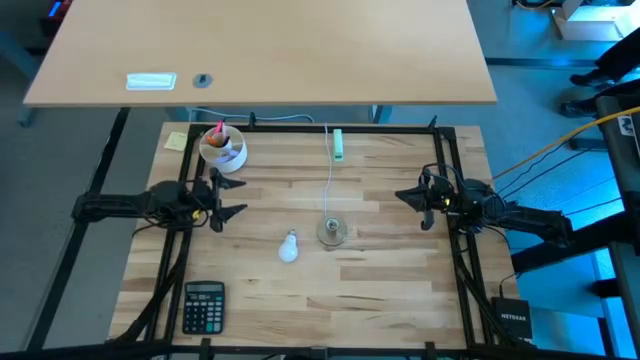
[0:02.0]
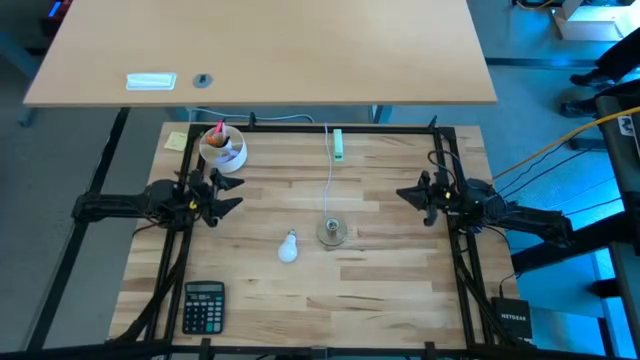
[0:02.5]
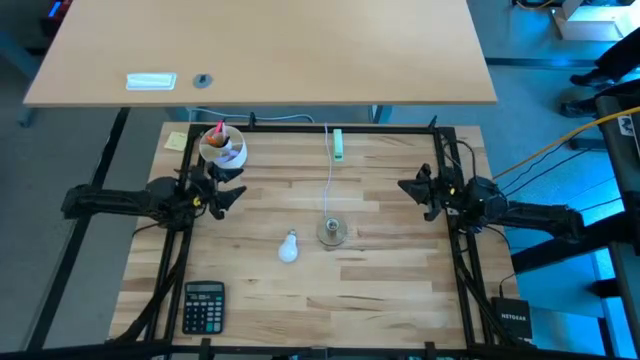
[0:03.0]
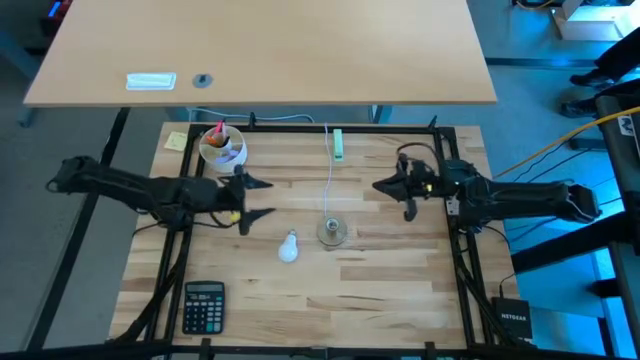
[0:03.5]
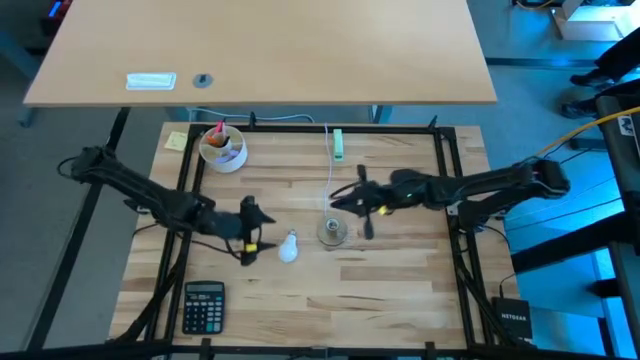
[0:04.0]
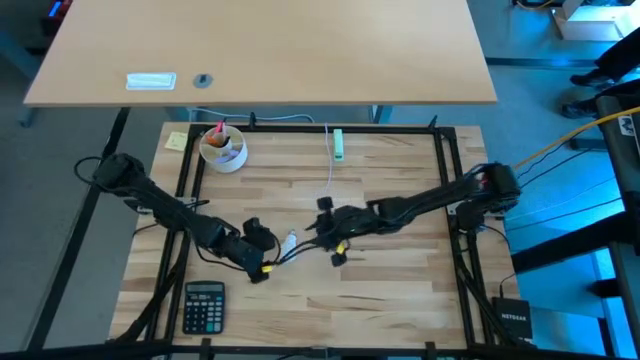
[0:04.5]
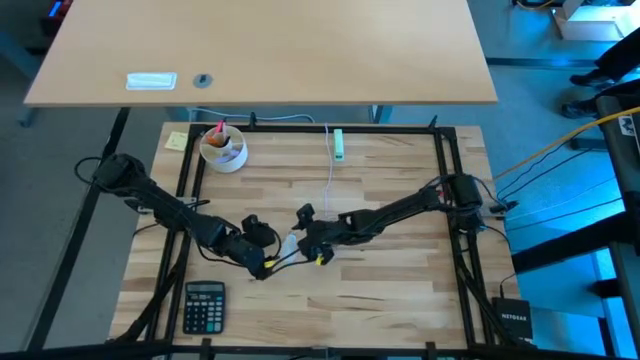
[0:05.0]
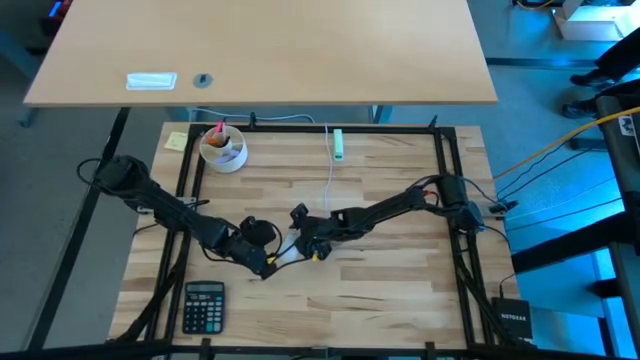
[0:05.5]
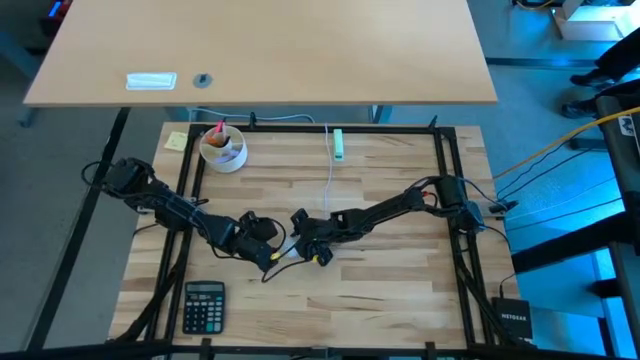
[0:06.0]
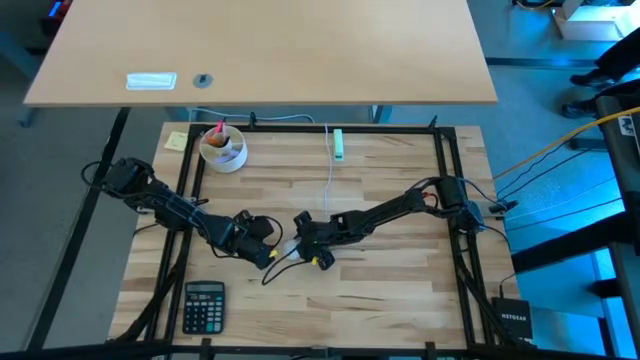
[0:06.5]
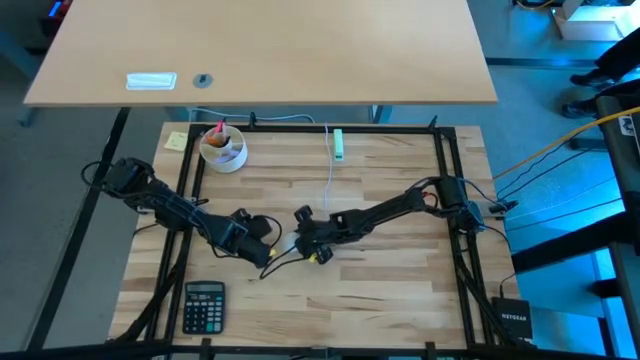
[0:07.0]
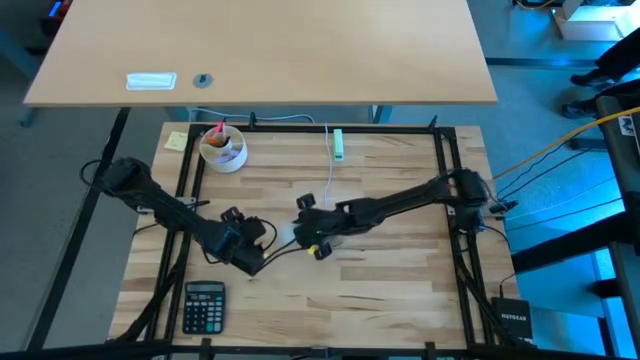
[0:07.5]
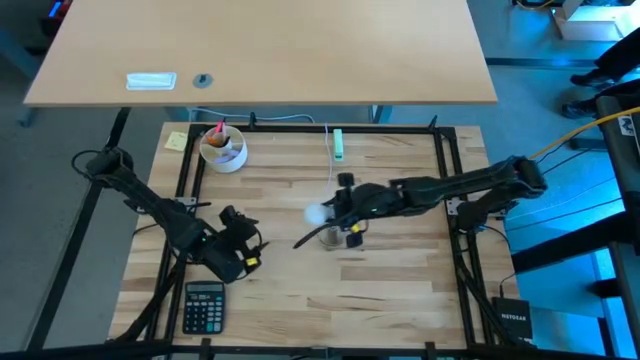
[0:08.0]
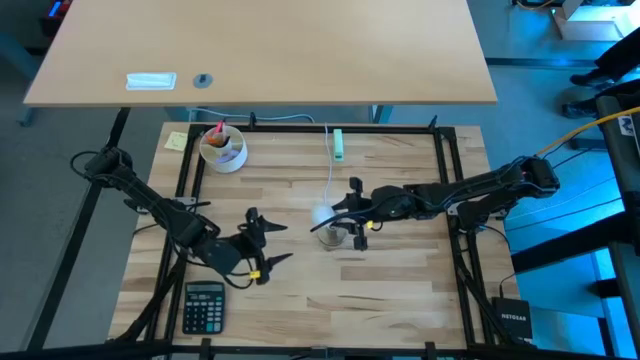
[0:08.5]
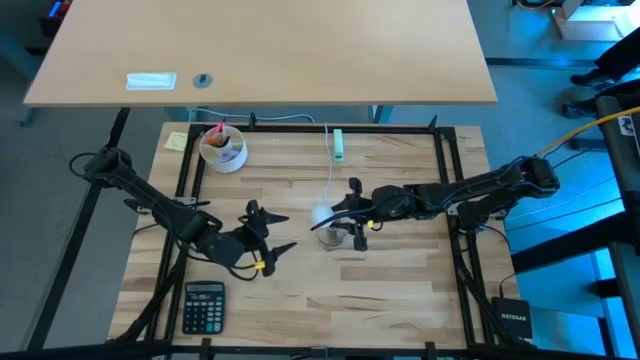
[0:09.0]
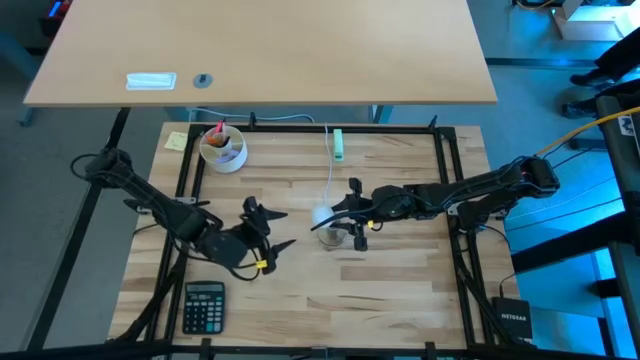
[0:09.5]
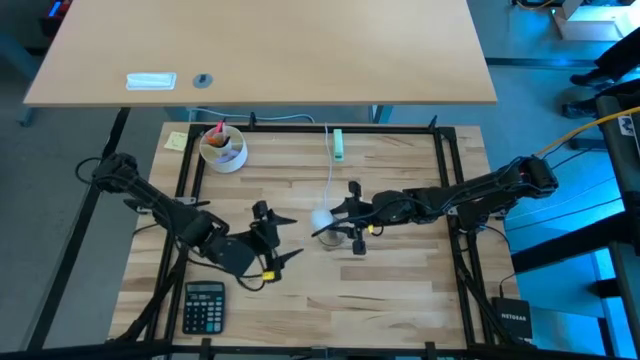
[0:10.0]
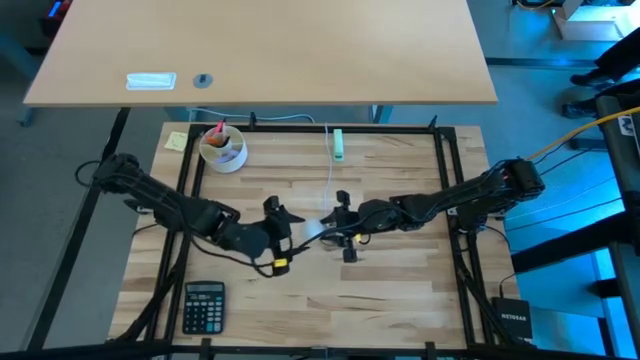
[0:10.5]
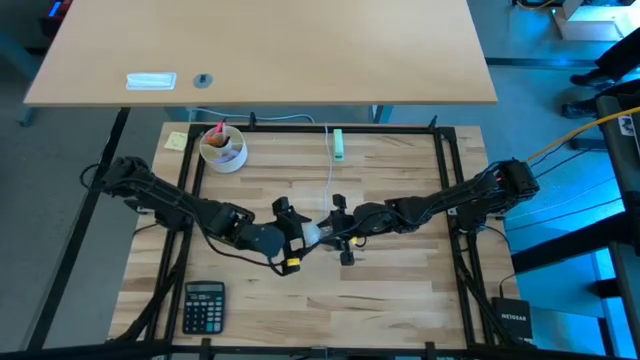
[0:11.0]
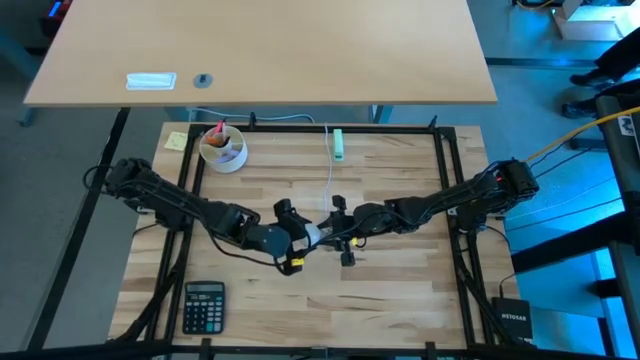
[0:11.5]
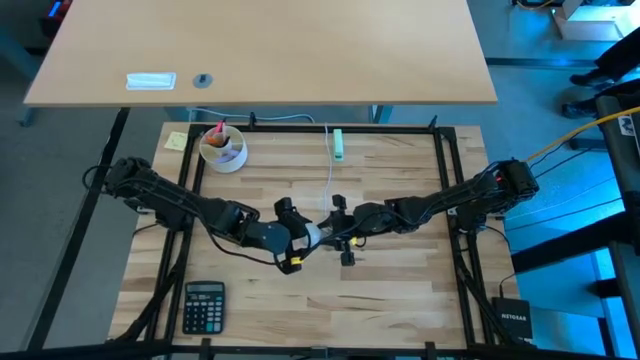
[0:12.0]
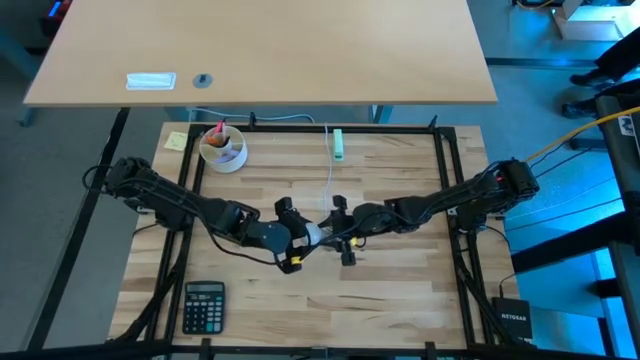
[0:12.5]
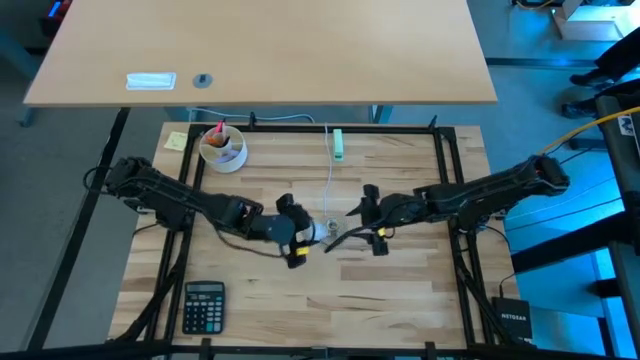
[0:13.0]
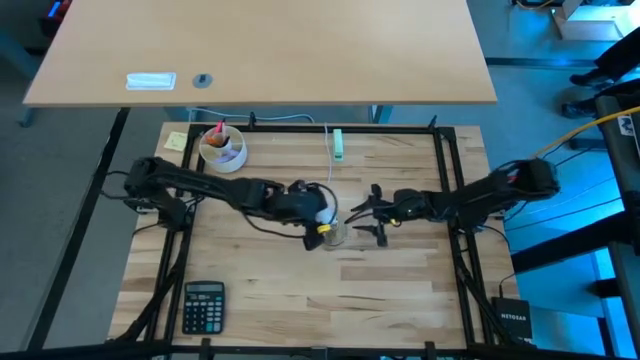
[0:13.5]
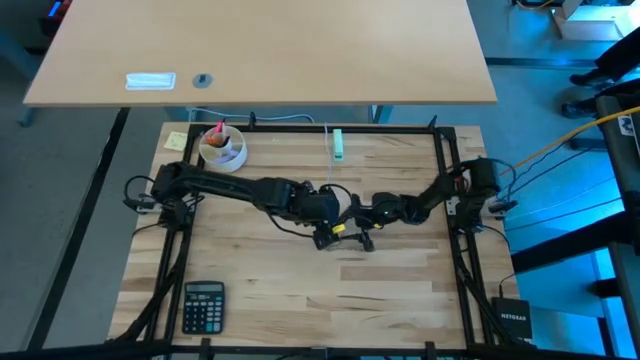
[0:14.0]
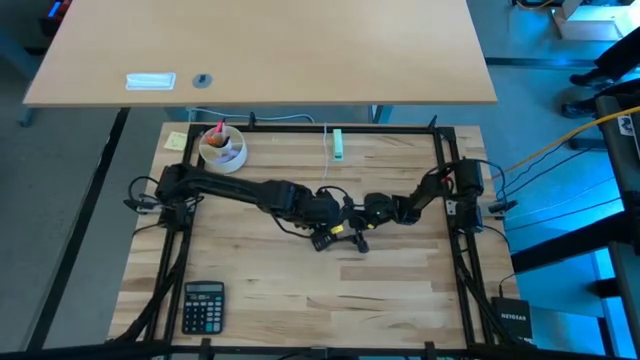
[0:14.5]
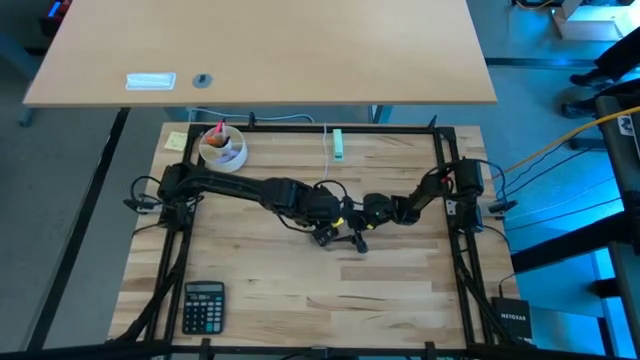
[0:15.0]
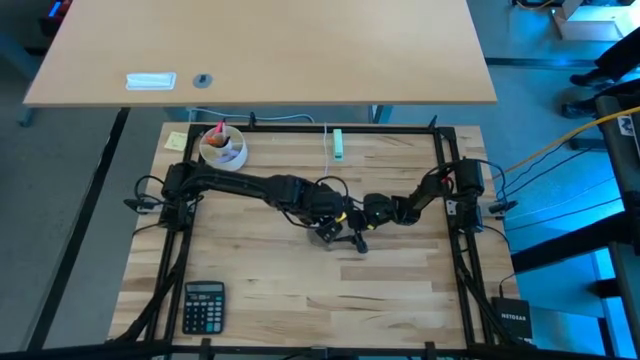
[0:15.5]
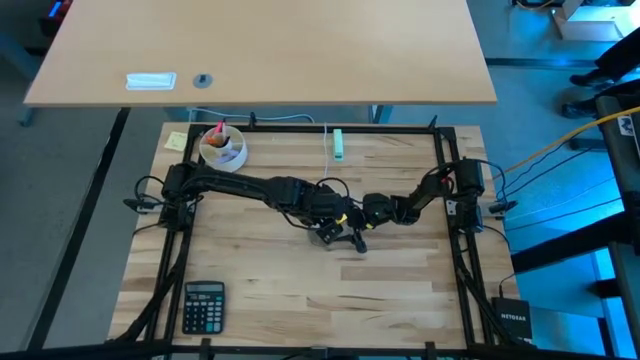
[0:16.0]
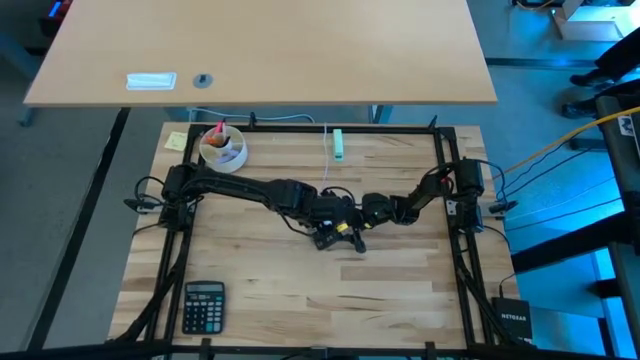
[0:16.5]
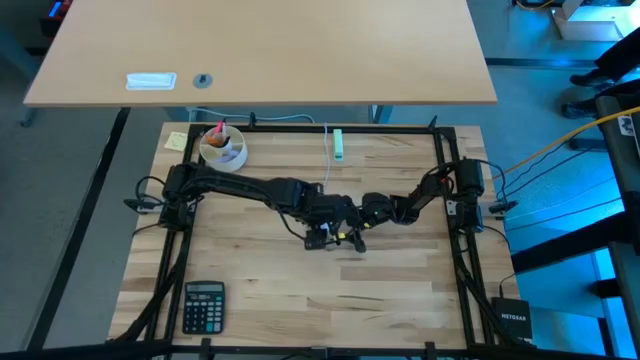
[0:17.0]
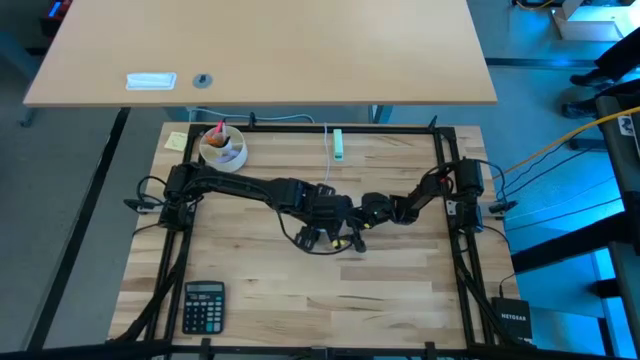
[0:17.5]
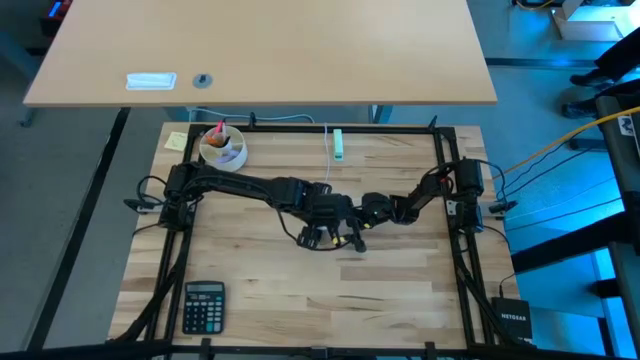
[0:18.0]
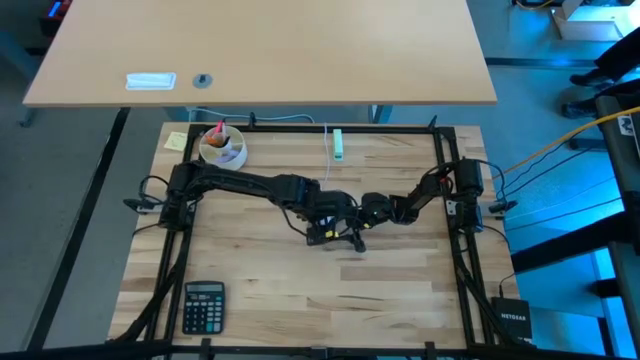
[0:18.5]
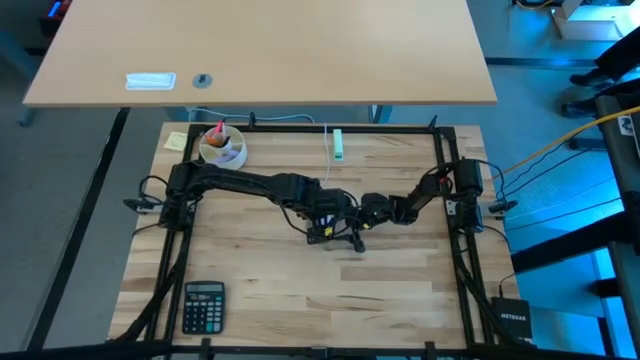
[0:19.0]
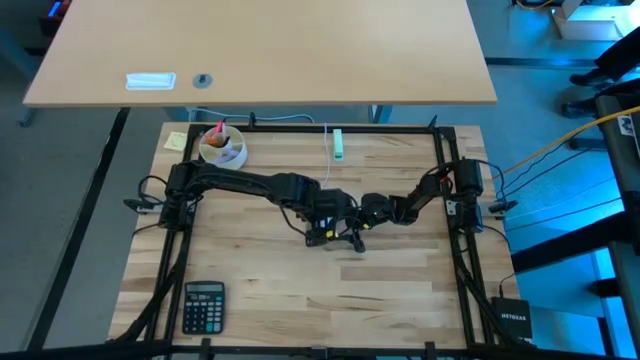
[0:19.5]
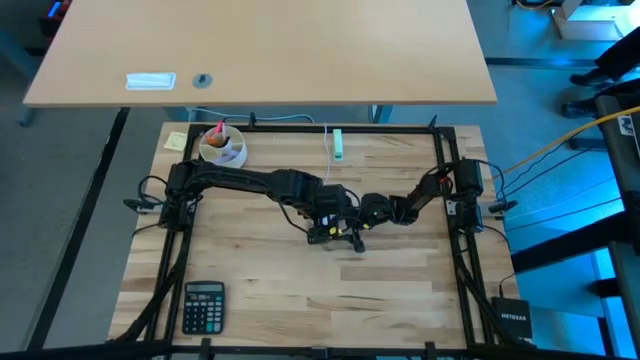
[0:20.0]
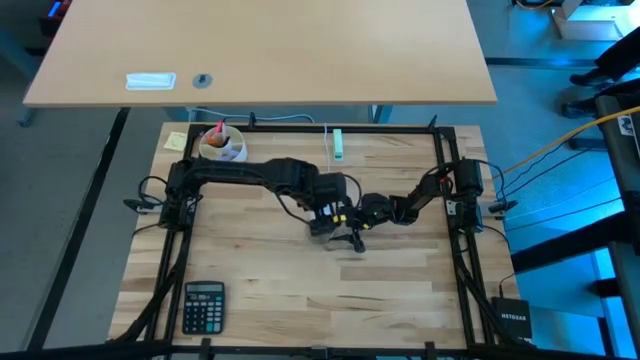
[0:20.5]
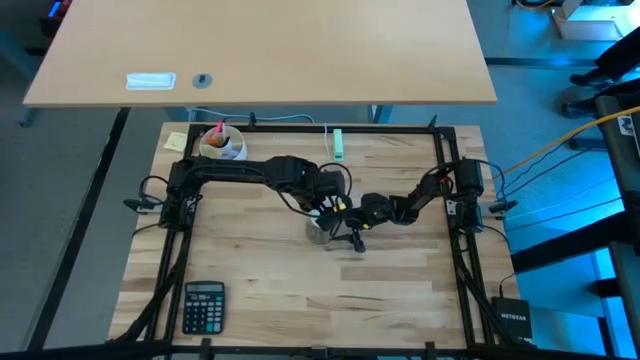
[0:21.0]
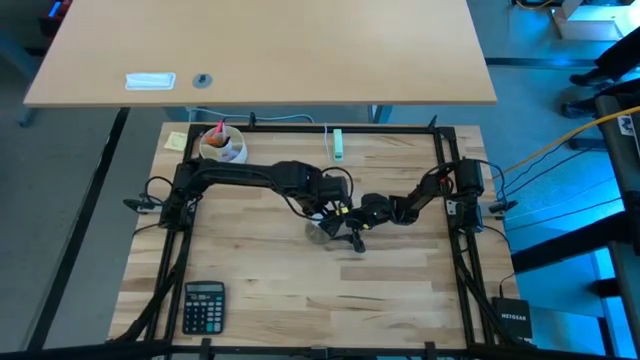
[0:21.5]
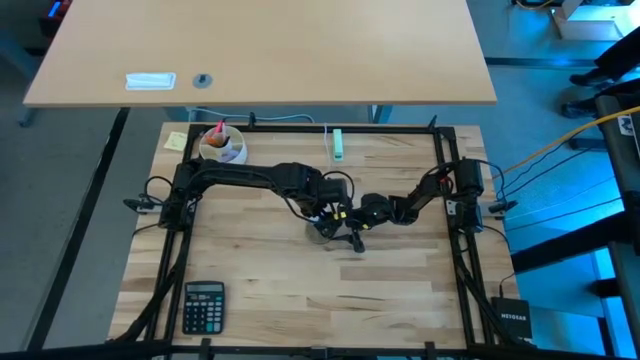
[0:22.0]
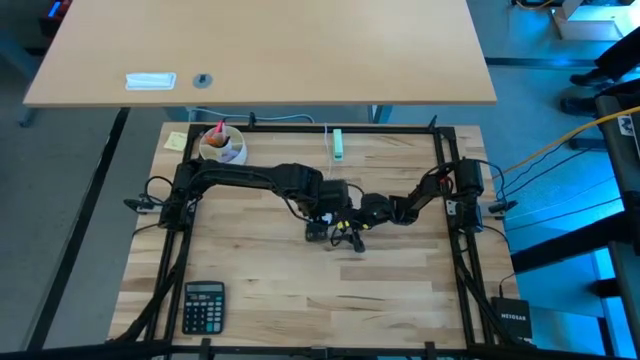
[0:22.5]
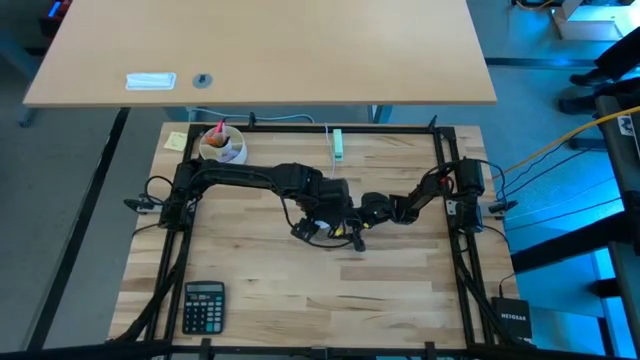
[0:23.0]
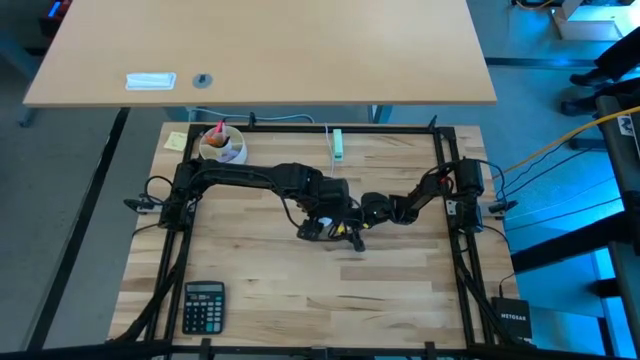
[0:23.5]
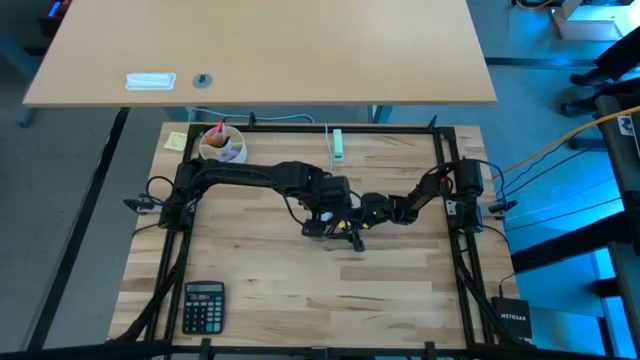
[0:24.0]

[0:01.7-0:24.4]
Task: Screw lightbulb
Insert the lightbulb into the lamp socket
